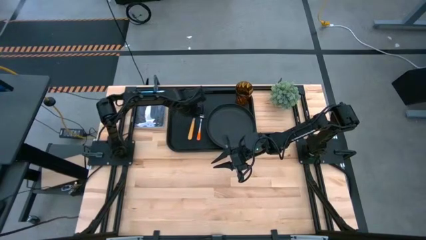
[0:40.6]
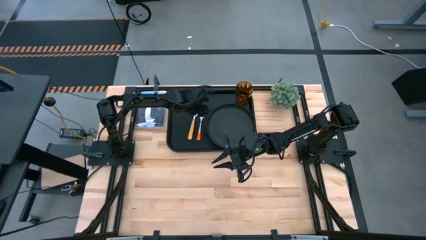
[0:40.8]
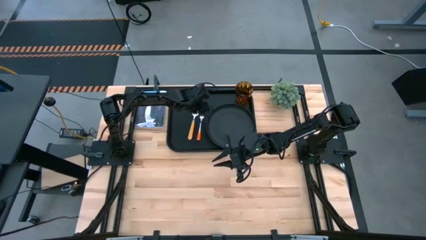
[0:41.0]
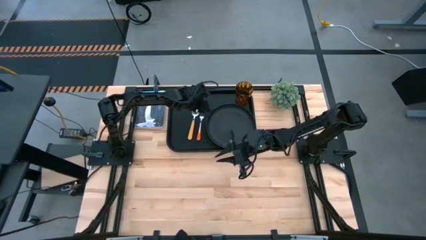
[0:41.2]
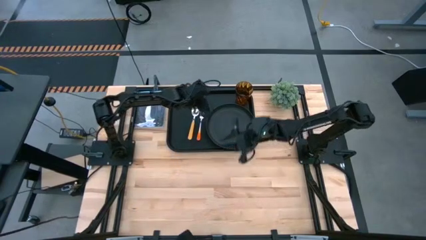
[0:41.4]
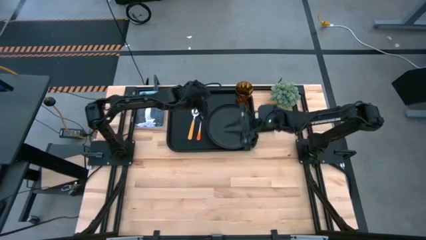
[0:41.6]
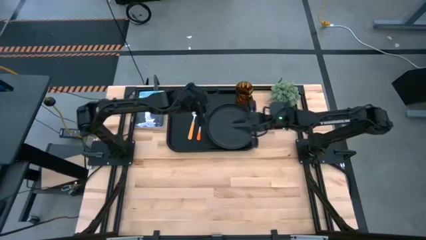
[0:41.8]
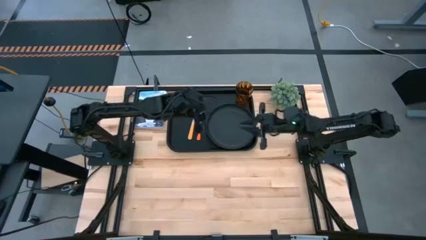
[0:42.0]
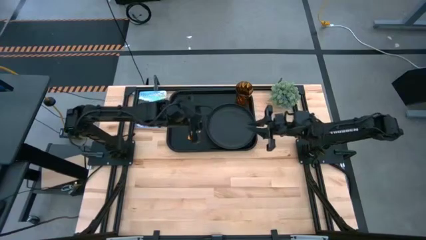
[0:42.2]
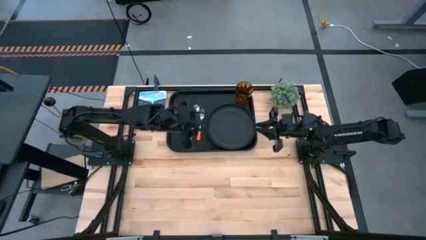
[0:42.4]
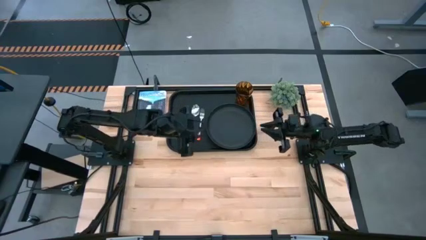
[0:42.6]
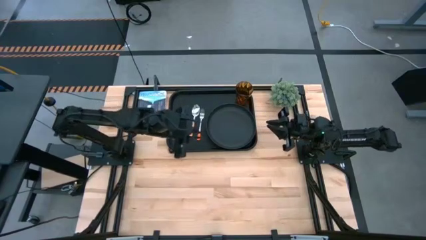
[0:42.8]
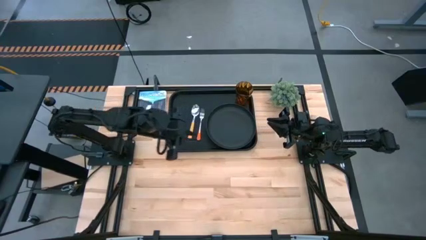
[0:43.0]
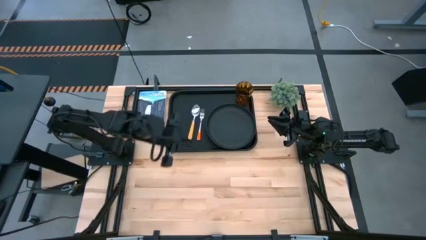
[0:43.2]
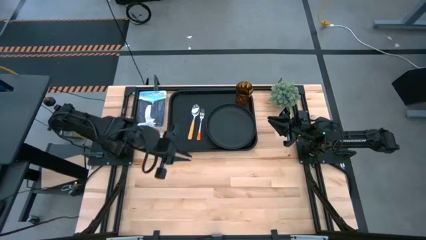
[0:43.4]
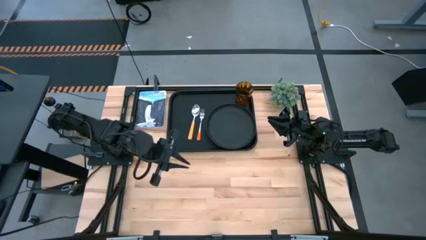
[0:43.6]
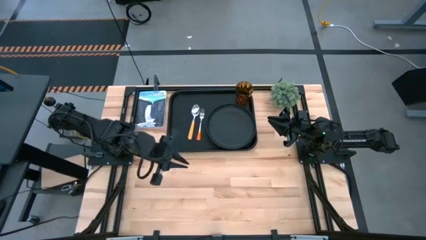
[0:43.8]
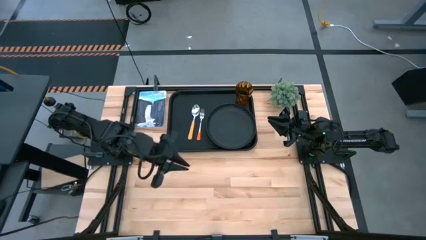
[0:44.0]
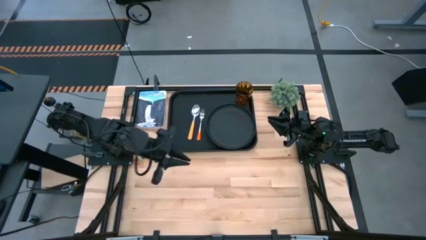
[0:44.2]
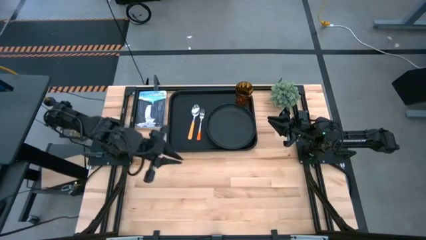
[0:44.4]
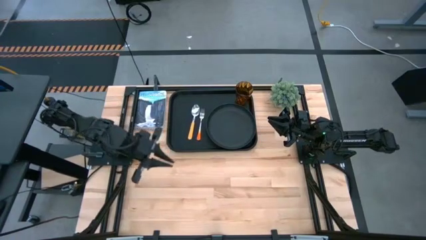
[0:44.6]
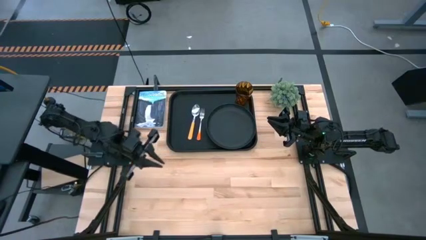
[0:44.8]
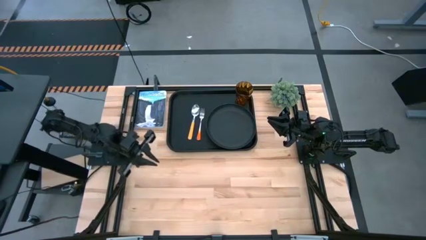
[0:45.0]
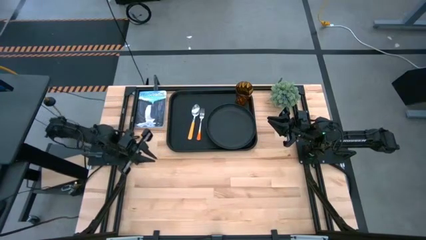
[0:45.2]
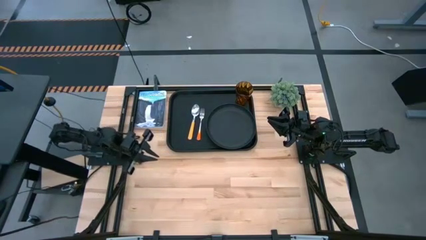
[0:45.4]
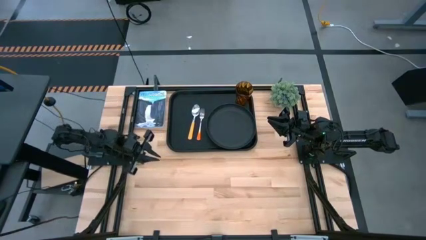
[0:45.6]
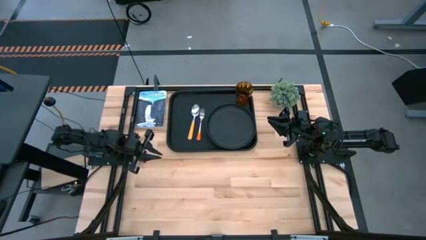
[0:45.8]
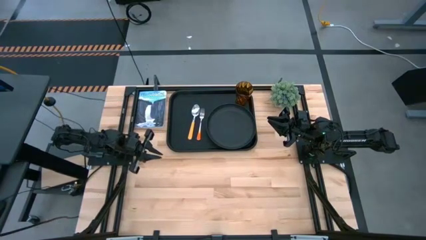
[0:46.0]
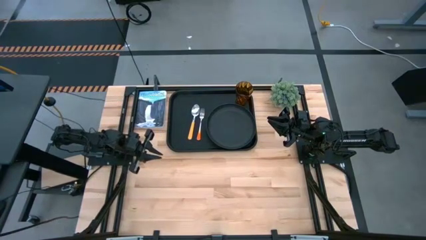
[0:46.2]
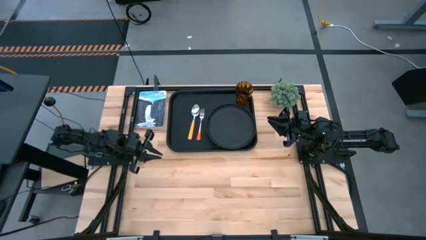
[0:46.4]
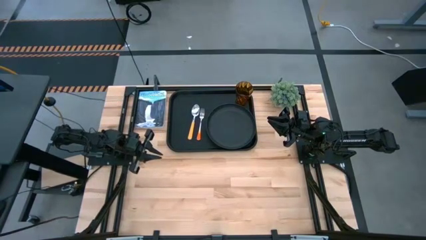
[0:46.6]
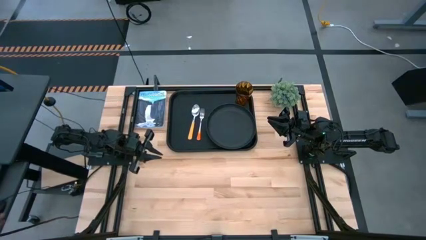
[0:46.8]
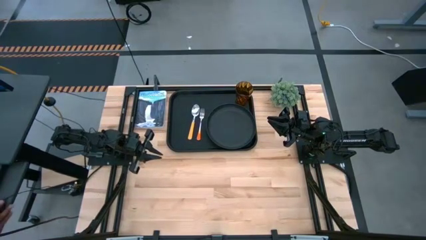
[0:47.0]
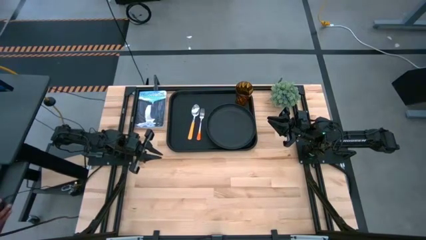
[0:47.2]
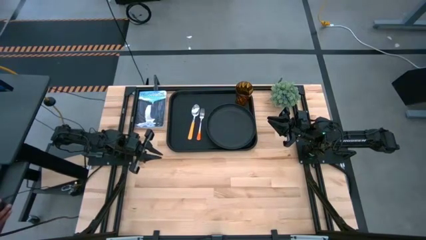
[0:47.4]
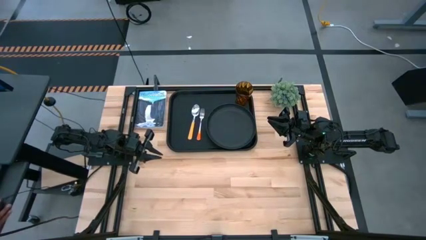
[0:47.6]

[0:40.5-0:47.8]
Task: Pick and place plate/cup/fork/spoon on tray
Return to Home Position

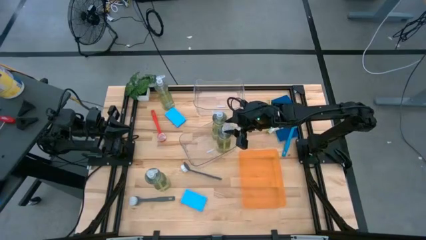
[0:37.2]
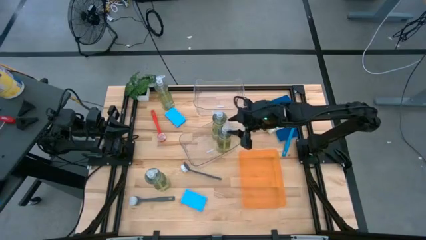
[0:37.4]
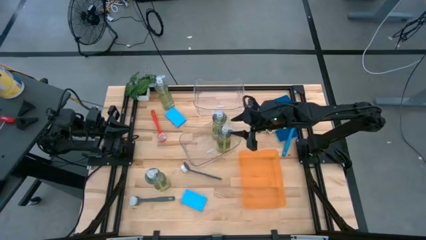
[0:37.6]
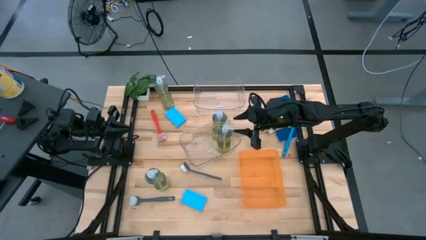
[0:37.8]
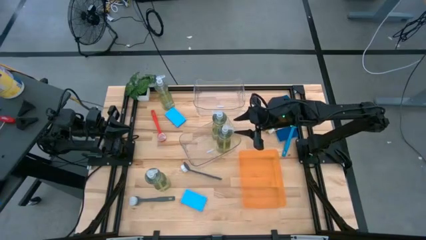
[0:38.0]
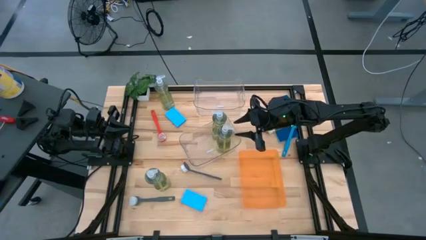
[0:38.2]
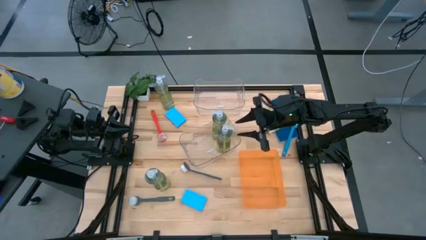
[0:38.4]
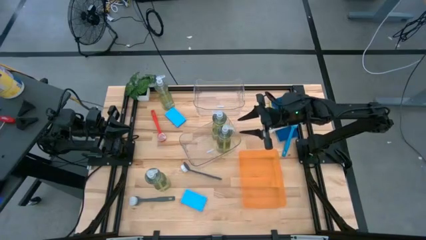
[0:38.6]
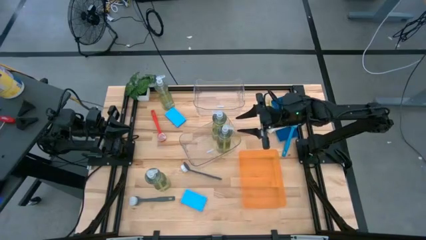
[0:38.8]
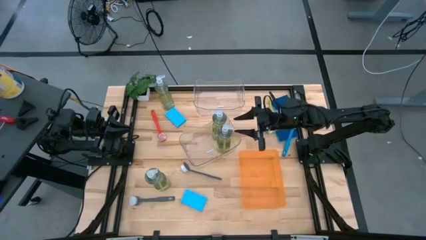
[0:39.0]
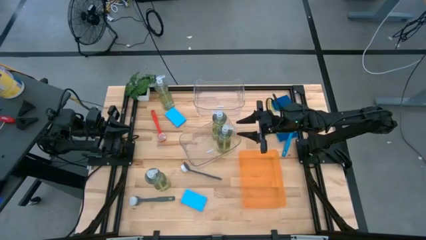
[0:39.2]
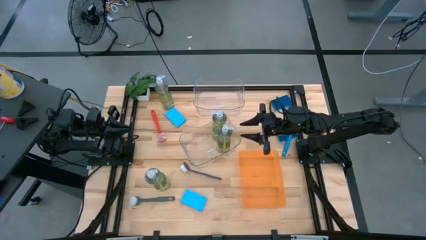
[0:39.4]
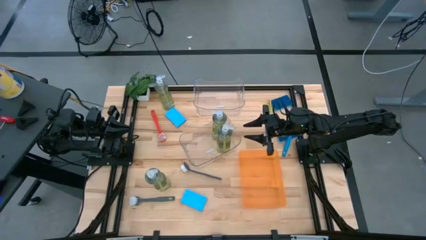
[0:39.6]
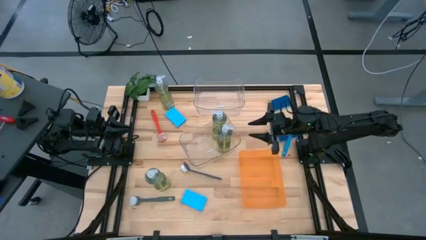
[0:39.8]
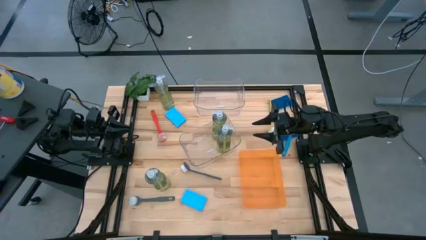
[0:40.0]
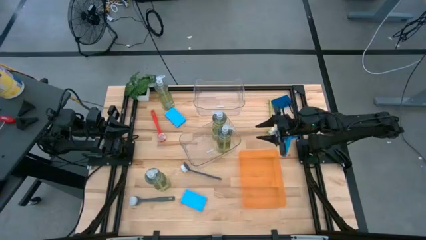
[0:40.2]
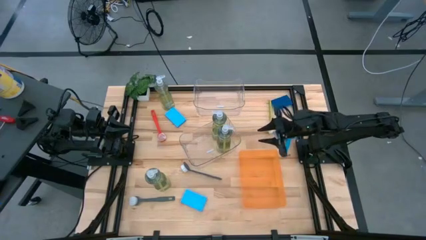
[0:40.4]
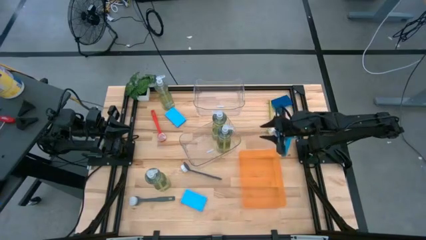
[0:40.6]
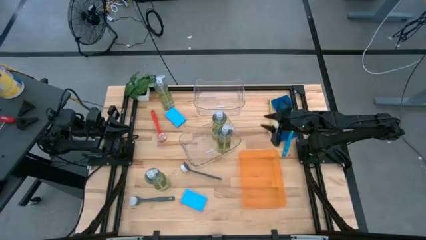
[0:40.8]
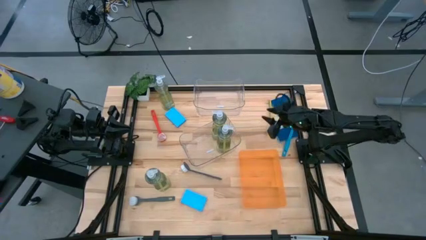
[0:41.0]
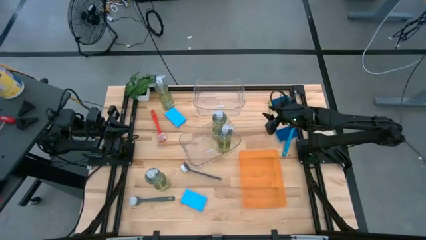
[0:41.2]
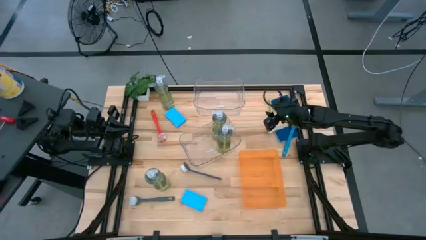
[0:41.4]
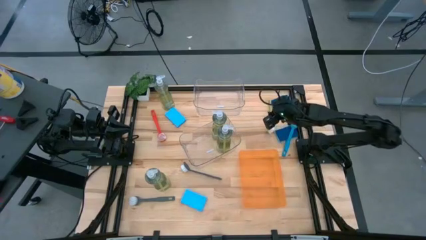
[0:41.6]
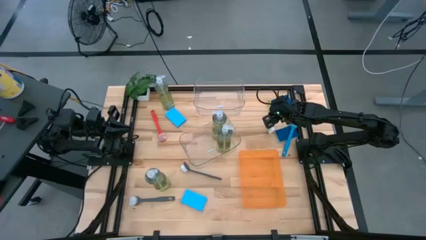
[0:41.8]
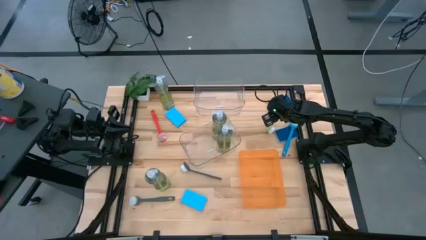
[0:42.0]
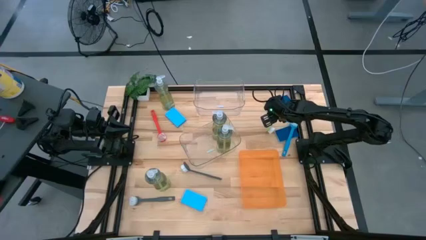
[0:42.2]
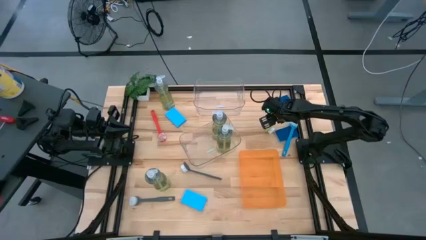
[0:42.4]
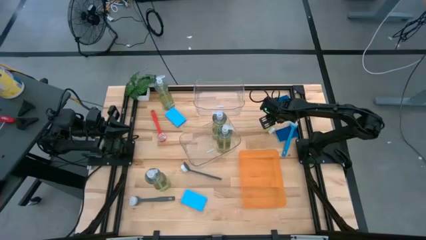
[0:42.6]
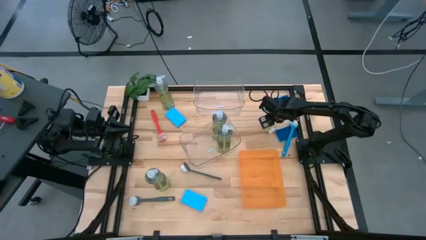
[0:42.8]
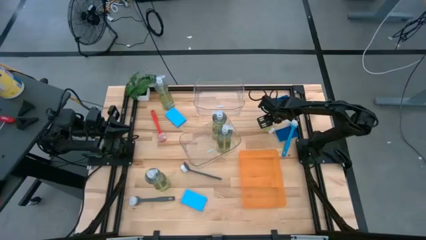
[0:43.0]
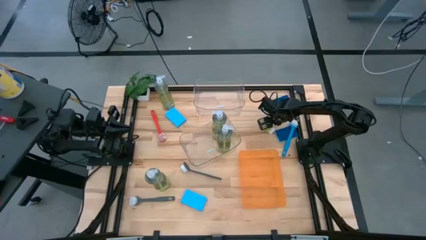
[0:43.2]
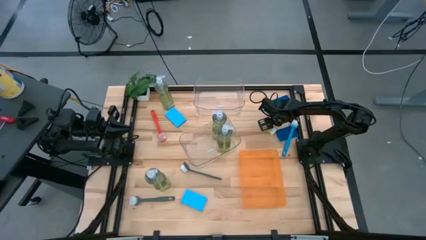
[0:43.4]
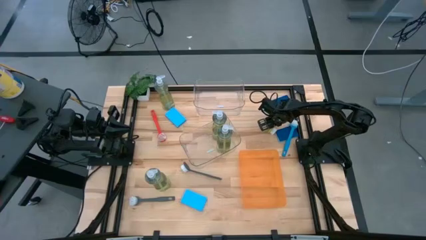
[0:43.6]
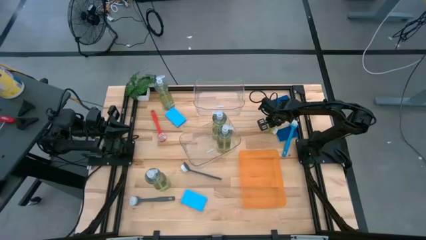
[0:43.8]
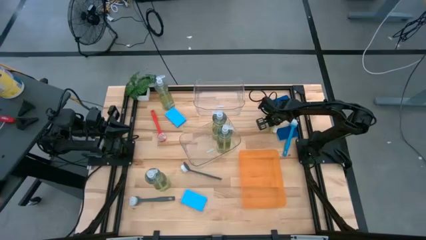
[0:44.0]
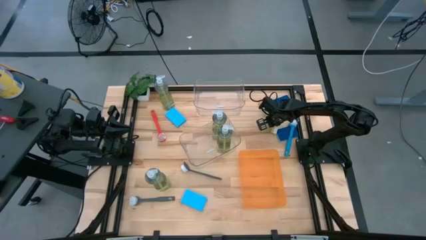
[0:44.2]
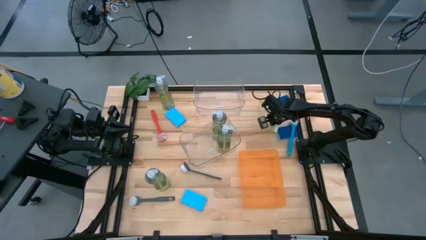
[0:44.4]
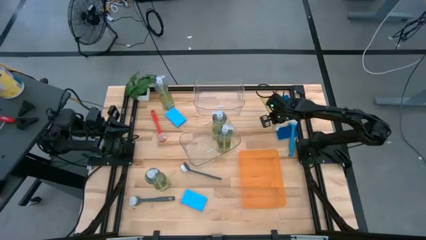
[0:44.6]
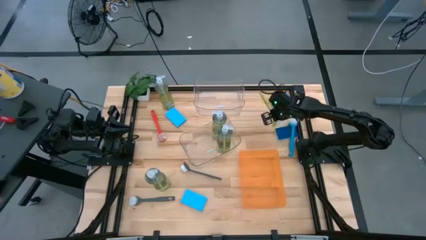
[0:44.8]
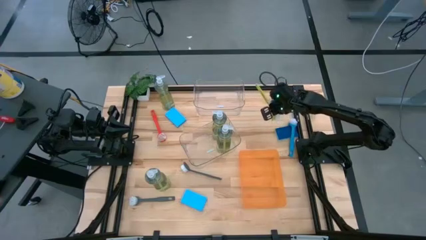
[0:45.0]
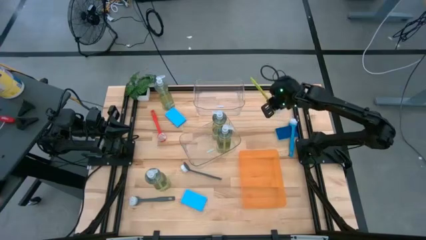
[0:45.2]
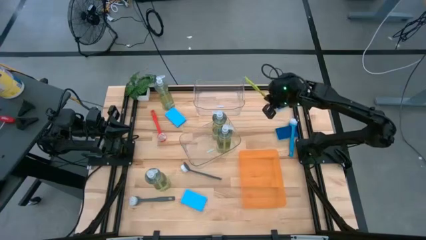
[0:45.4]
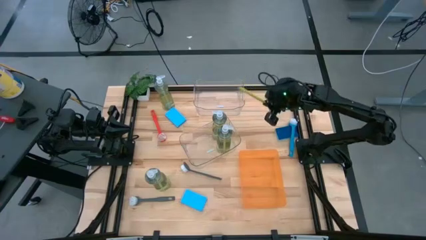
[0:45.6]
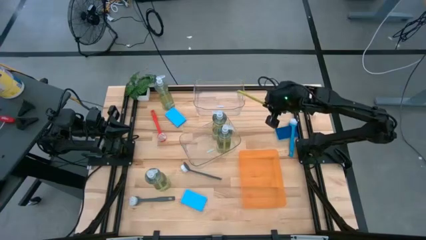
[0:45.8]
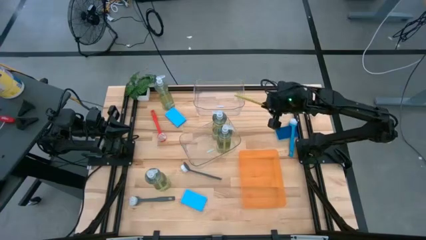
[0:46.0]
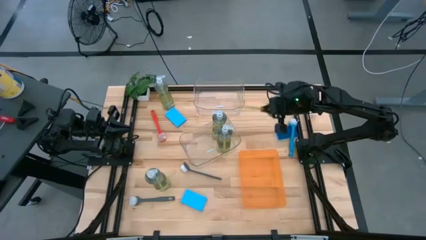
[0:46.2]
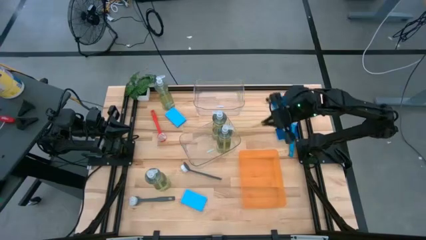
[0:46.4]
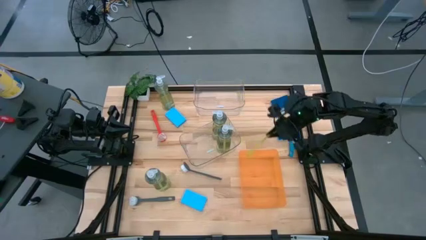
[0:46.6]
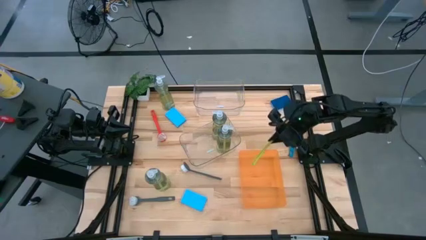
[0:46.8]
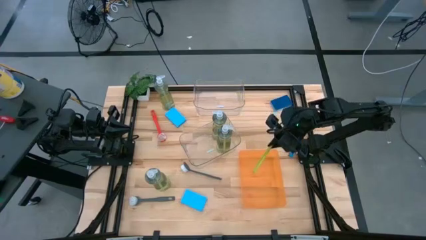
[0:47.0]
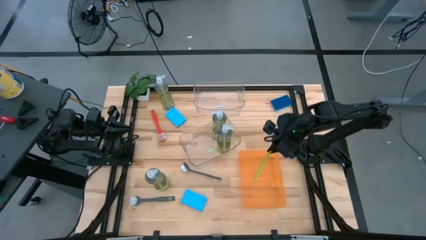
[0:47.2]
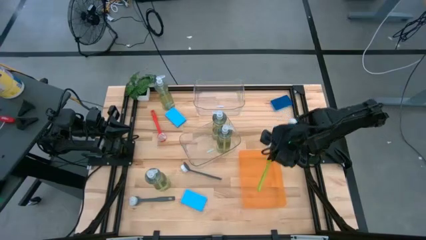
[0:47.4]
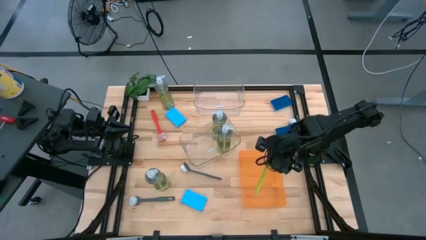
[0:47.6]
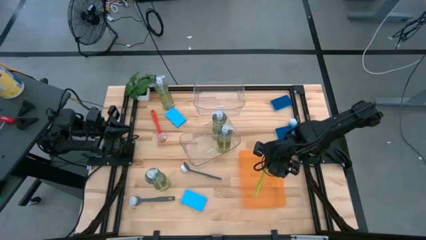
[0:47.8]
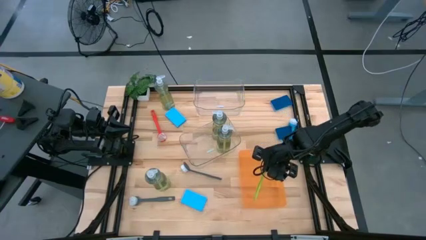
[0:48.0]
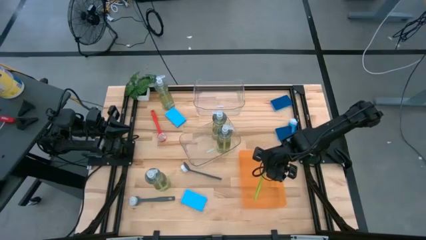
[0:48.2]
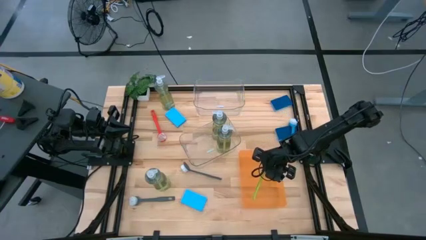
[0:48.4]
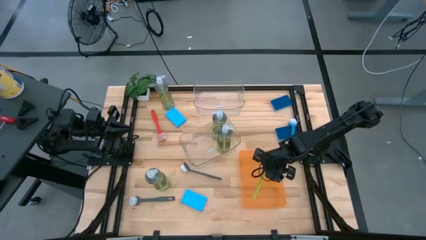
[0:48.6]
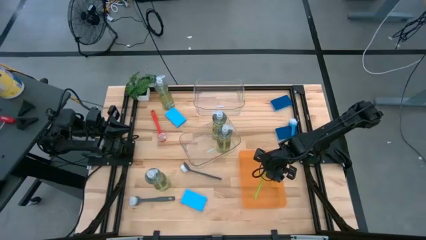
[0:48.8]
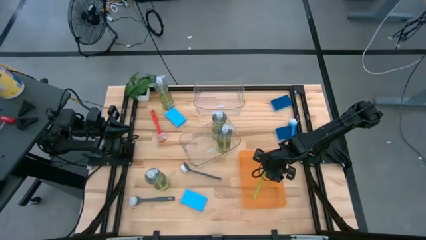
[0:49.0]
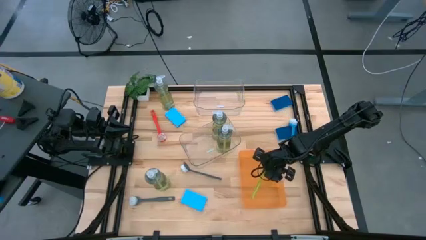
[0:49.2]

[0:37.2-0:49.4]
Task: Pick & Place Kitchen Sink Supplies
Put the green dish brush into the orange bin
